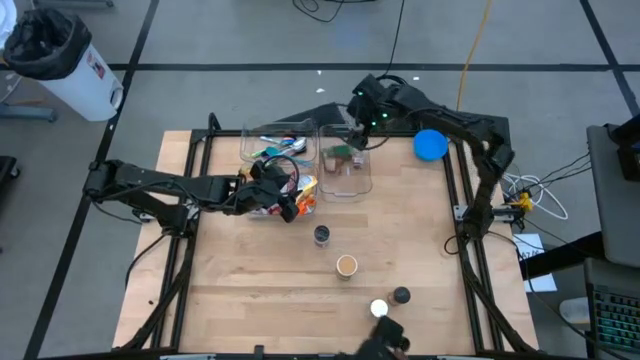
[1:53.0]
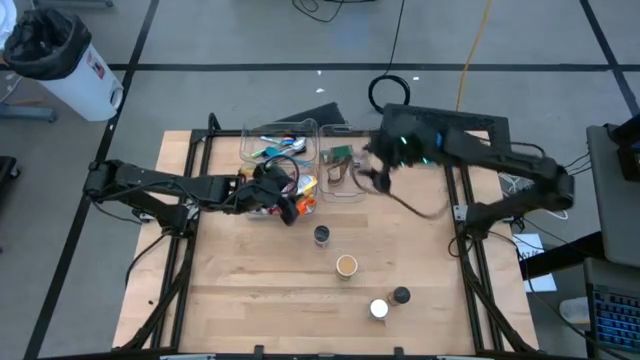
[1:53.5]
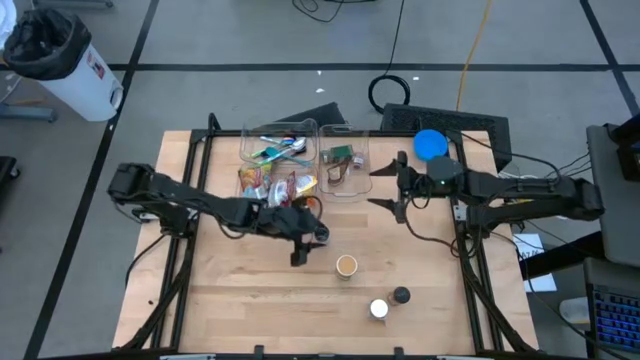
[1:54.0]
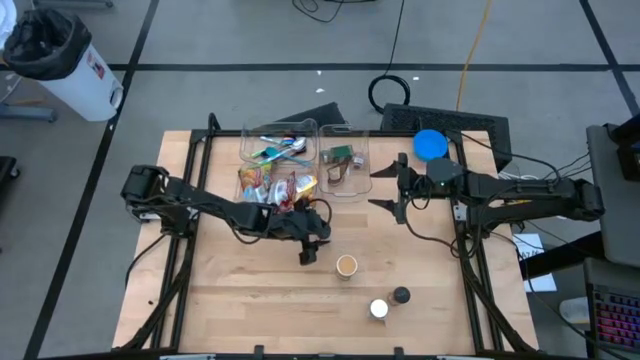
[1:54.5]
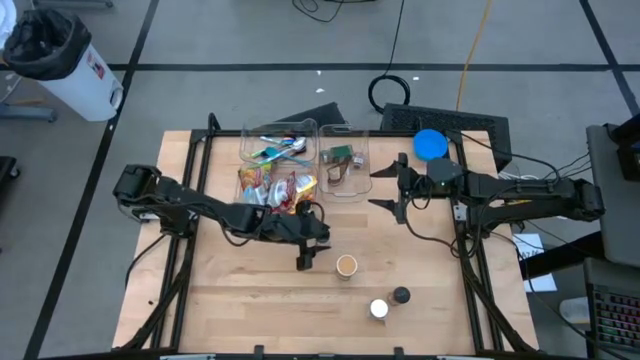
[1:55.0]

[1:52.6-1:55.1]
Task: Pick & Place Food Item
Put the purple seasoning bottle into the right transparent bin

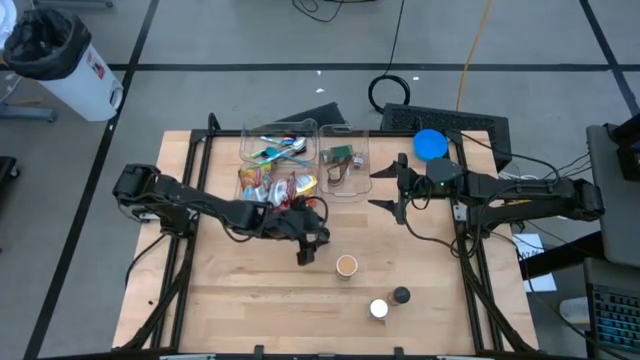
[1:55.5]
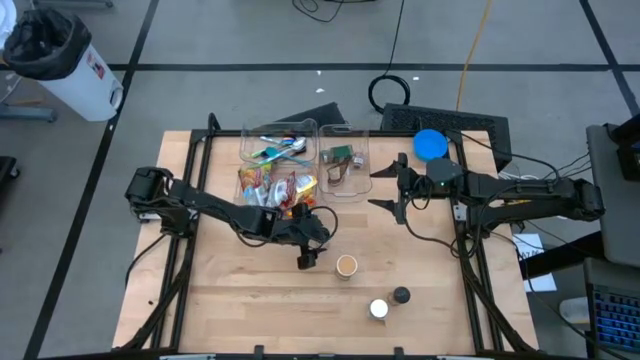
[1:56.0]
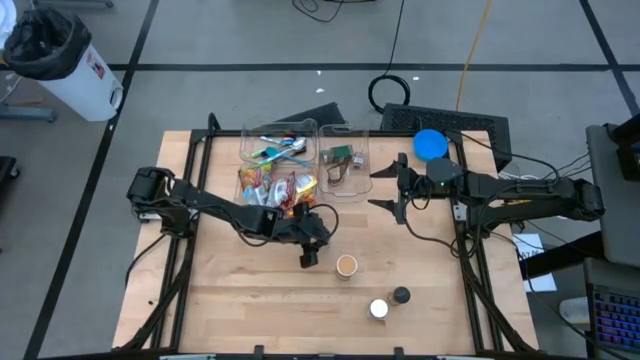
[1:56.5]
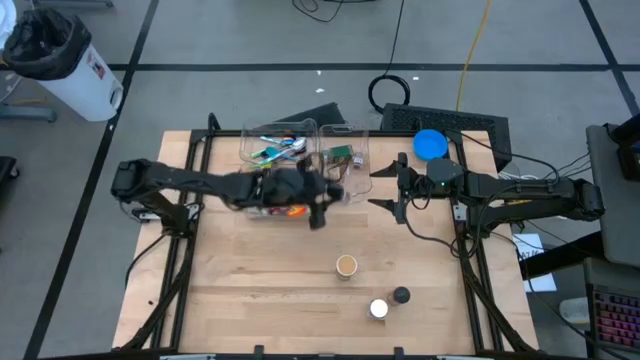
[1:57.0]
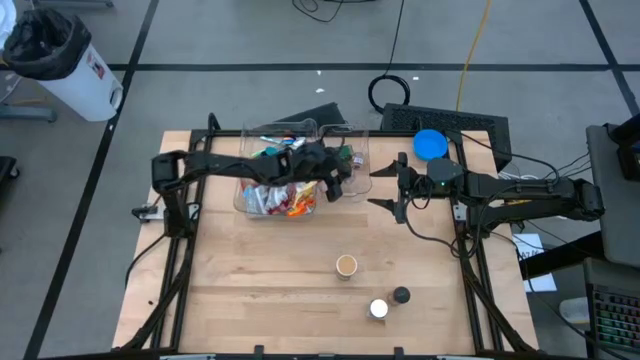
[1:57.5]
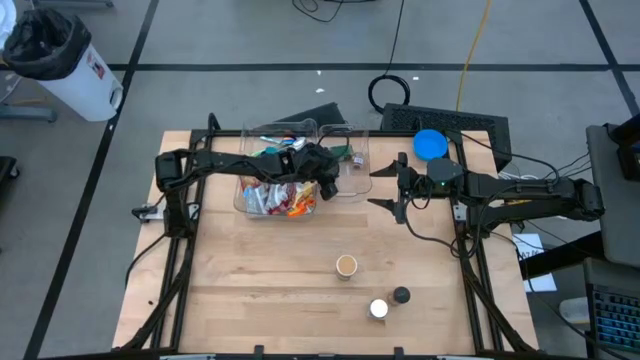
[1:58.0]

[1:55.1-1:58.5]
Put the purple seasoning bottle into the right transparent bin

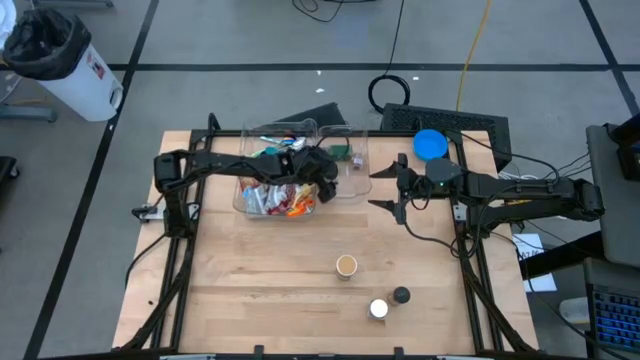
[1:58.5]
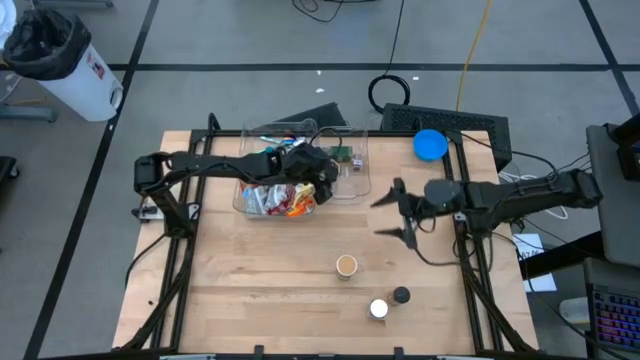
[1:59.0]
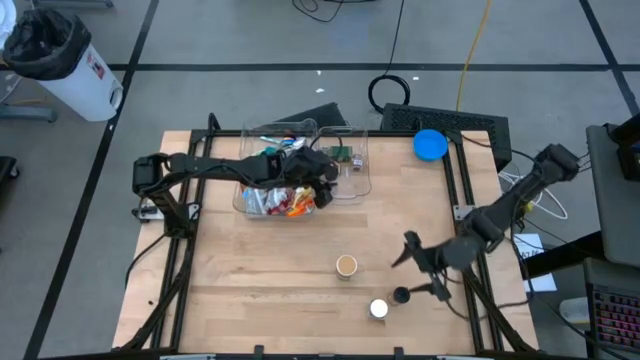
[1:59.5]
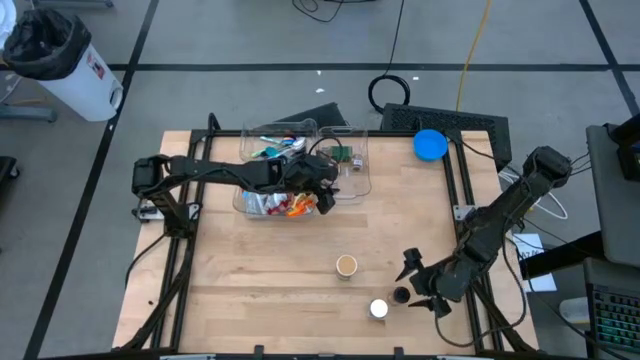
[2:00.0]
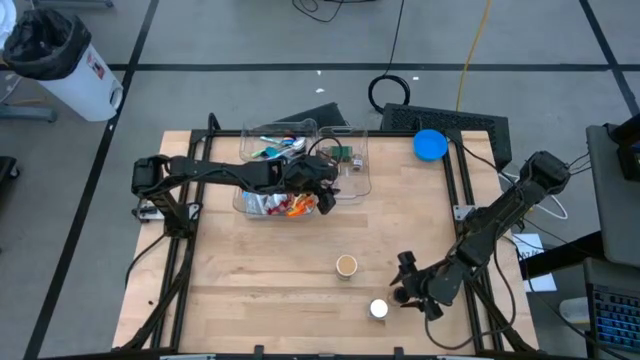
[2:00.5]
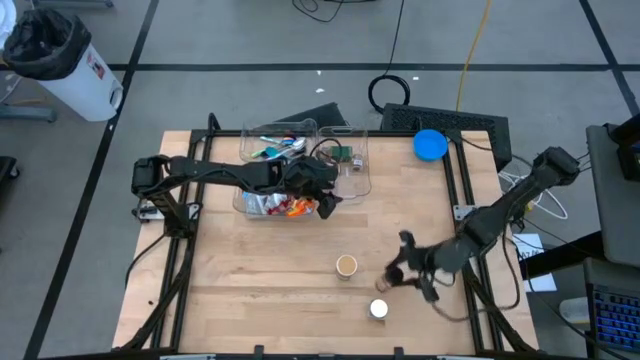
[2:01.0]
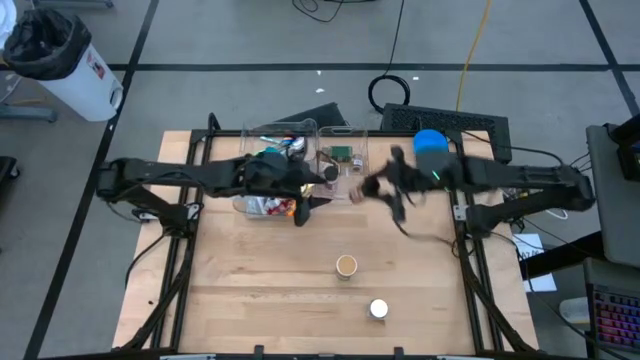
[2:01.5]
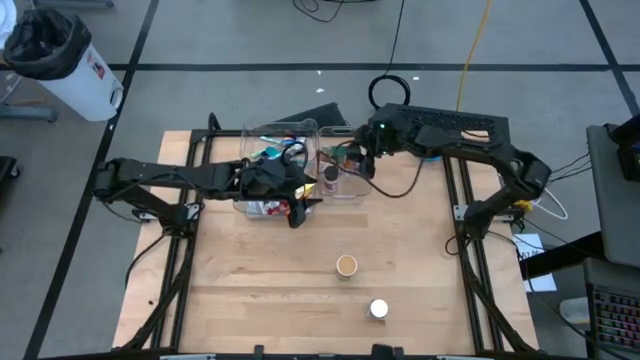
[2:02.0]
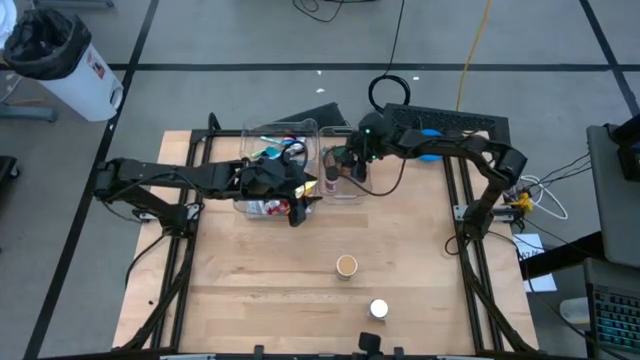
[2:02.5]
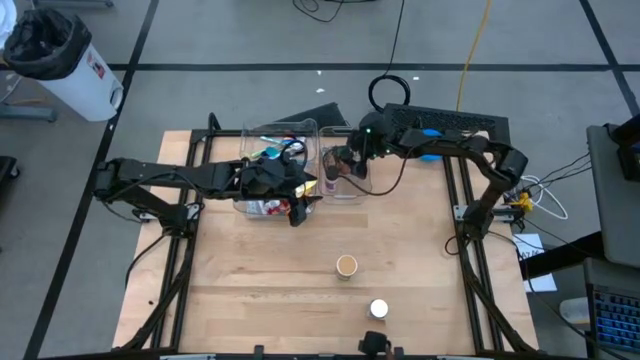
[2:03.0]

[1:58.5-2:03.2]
Put the orange seasoning bottle into the right transparent bin

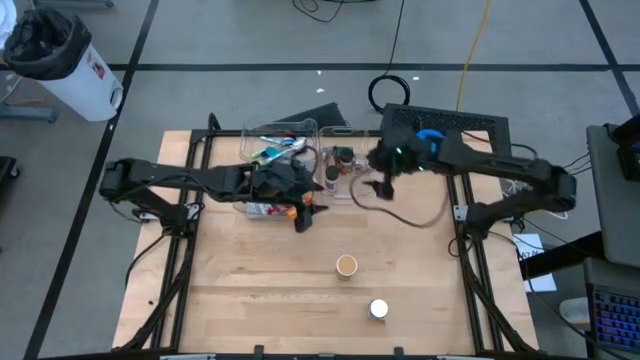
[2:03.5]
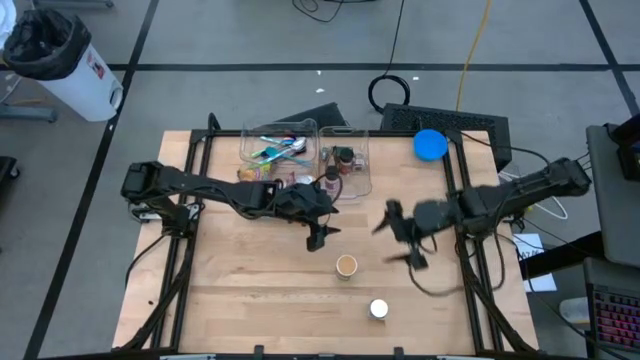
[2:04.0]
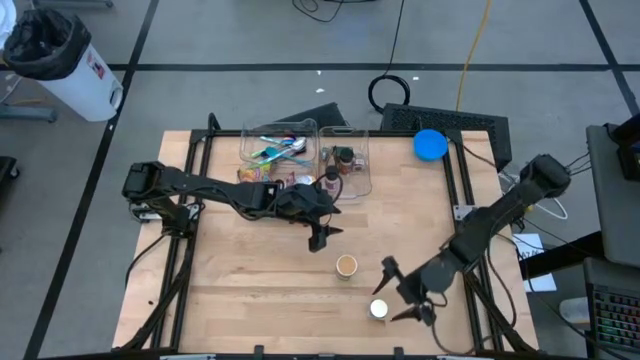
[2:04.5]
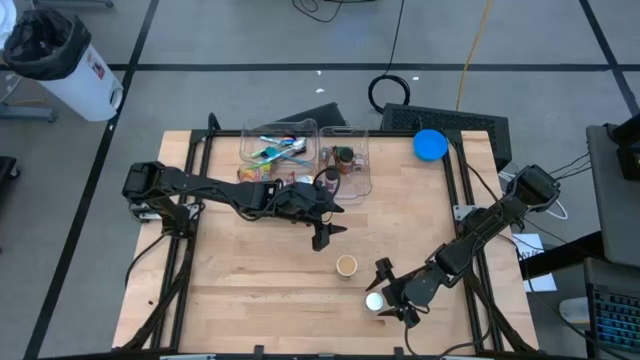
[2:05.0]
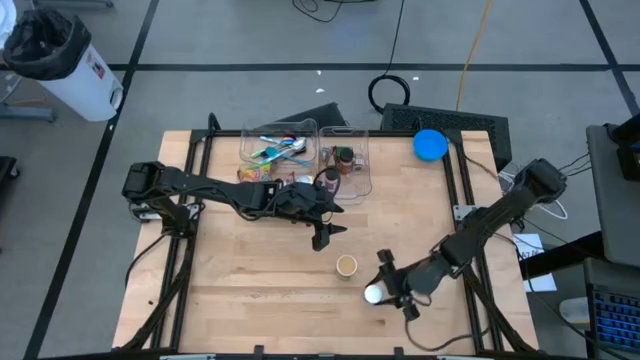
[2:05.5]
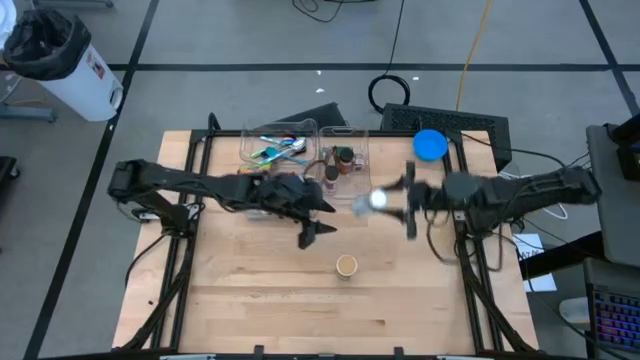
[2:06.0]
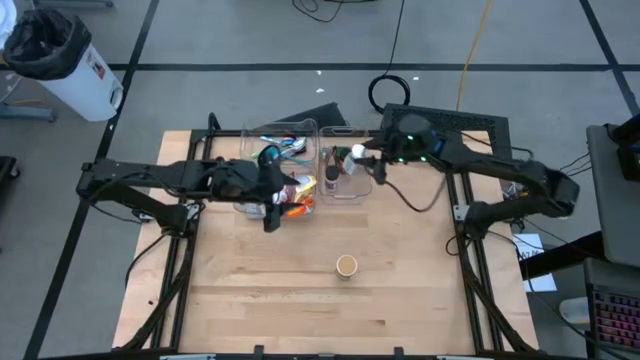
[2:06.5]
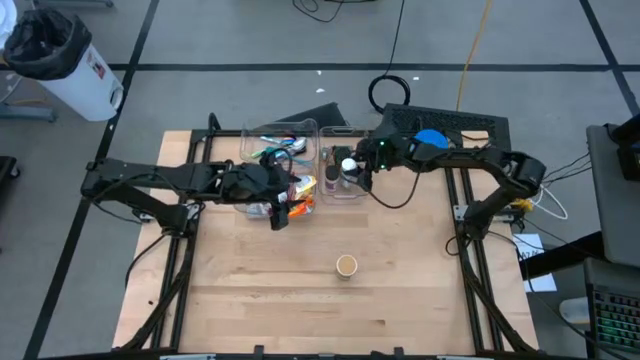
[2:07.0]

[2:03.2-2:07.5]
Put the white seasoning bottle into the right transparent bin

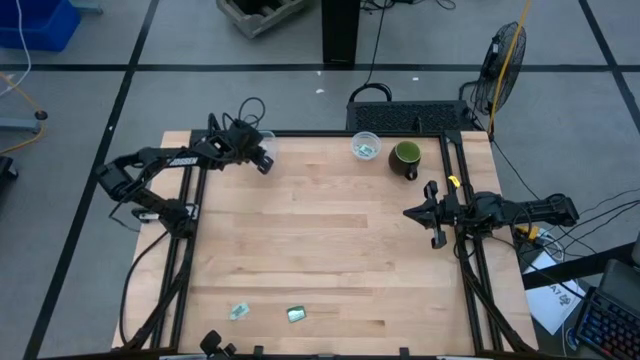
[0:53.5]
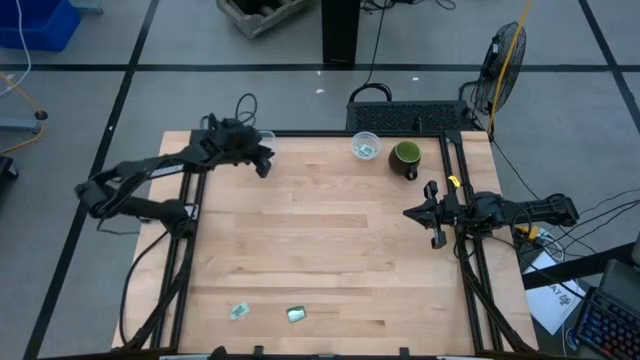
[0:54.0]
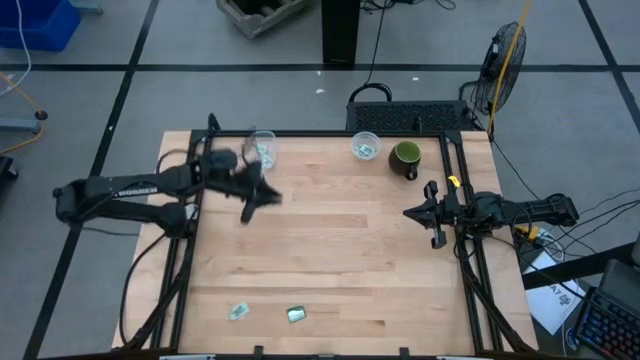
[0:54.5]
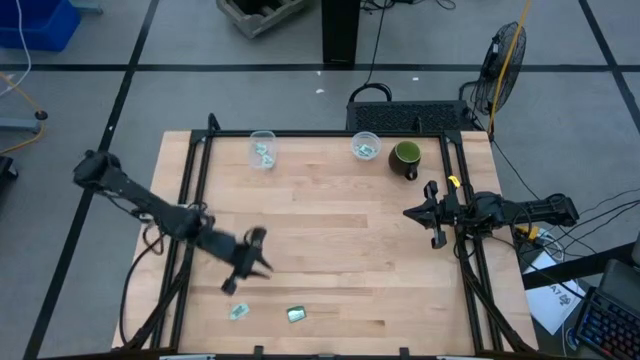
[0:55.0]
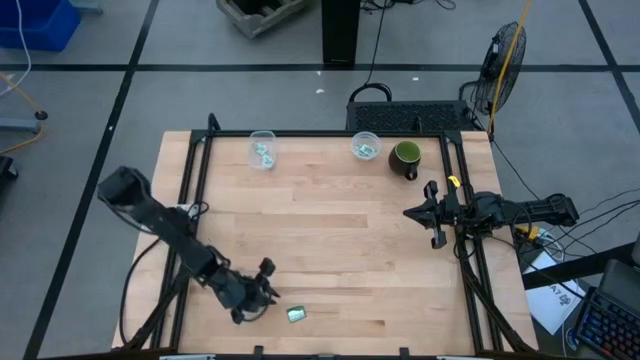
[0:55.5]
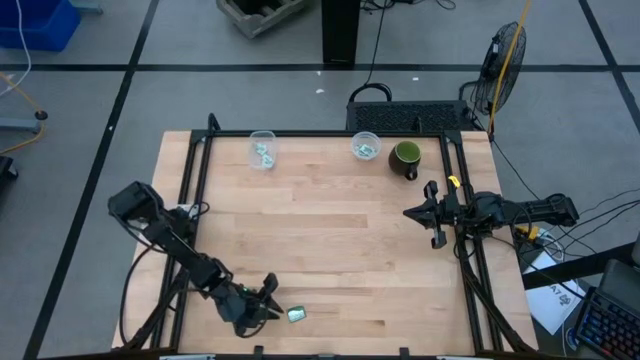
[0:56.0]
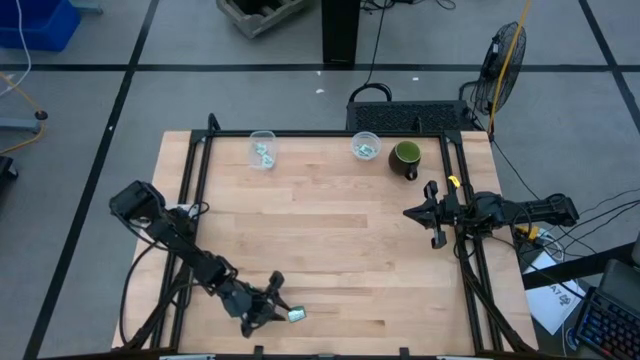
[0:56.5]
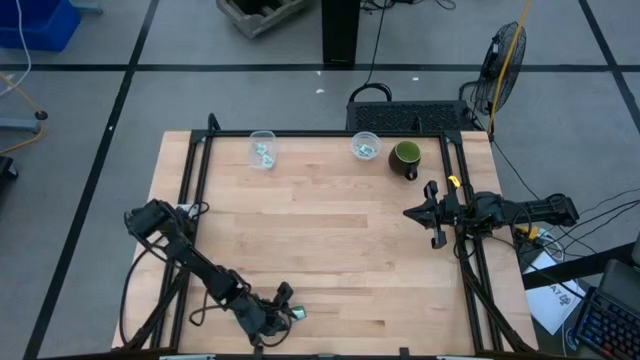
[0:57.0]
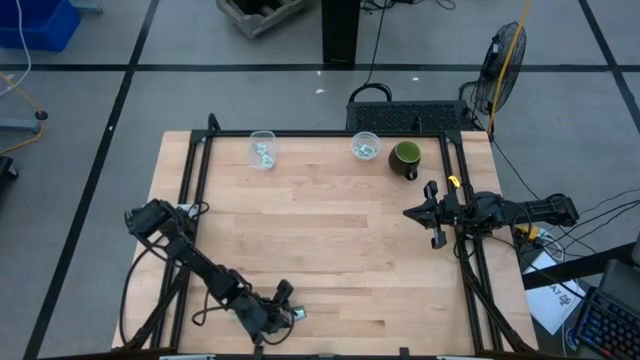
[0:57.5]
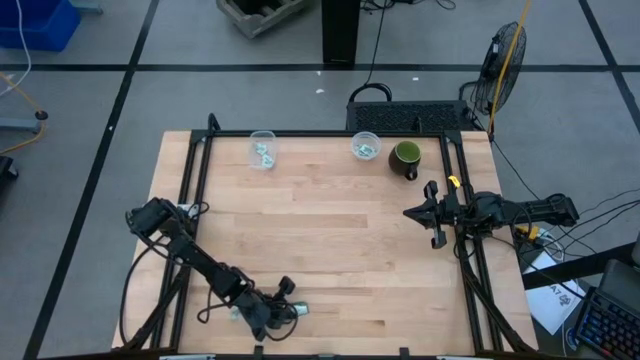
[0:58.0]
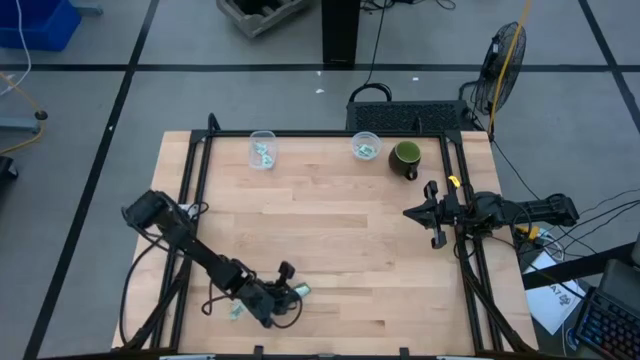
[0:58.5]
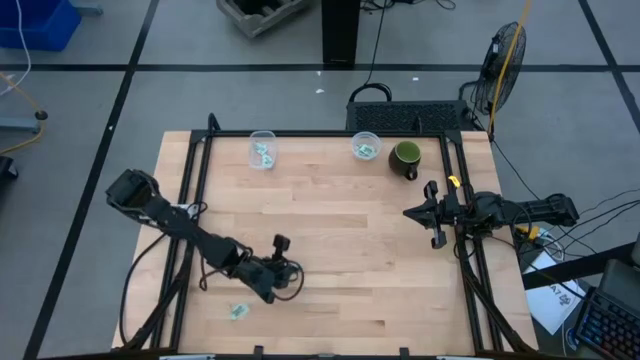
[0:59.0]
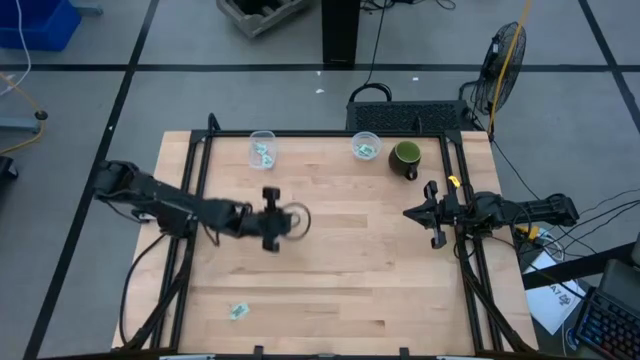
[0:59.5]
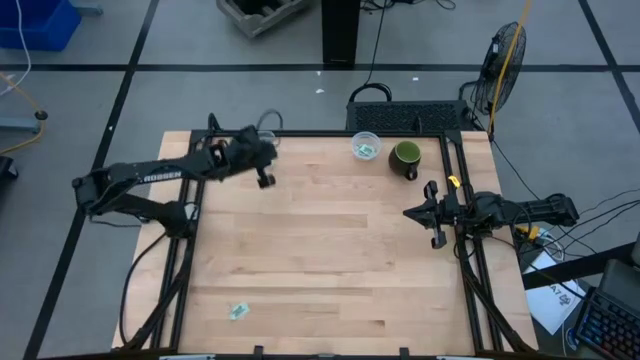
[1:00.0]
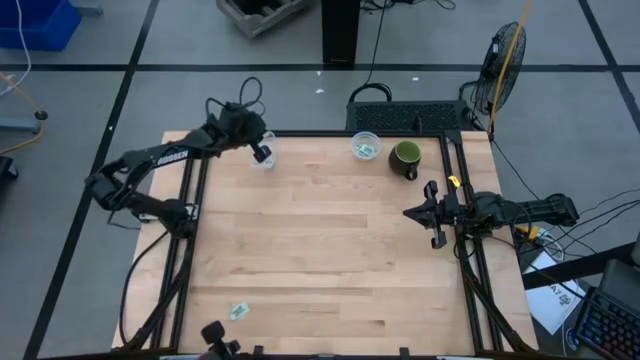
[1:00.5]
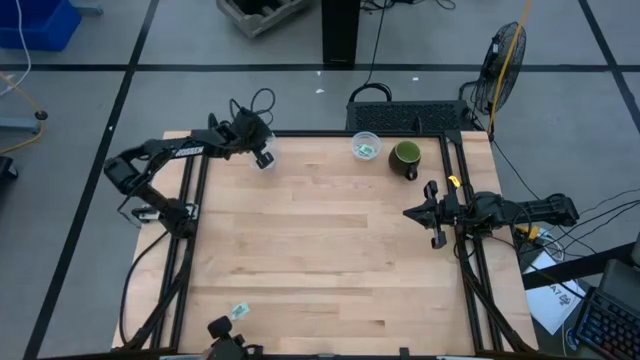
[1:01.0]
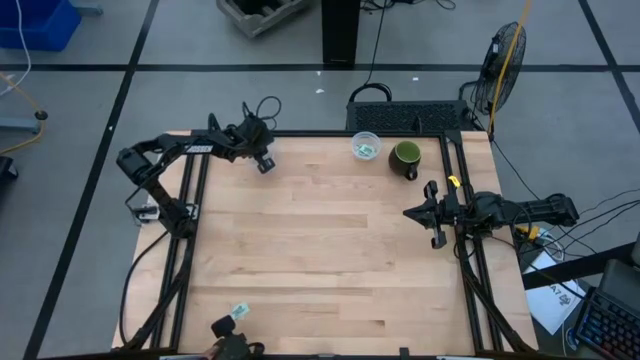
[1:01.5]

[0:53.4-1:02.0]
Task: Pick and place items into bin
Put the dark green truvia packet into the left transparent bin
